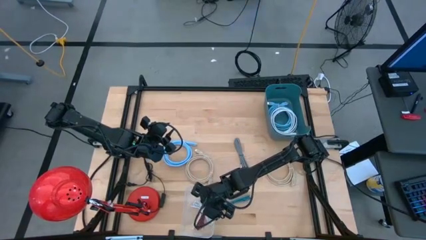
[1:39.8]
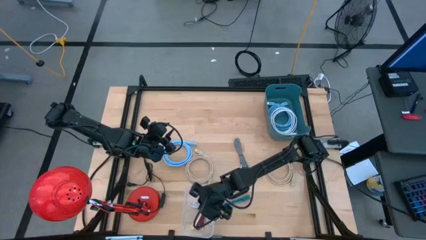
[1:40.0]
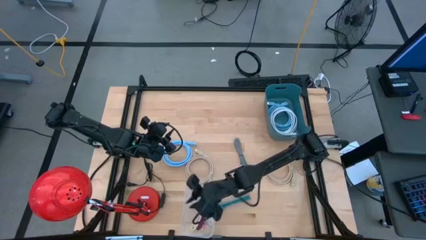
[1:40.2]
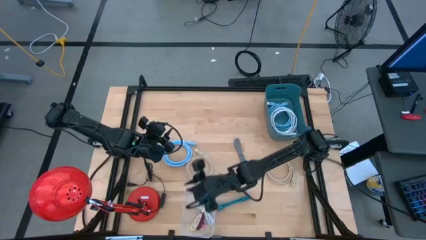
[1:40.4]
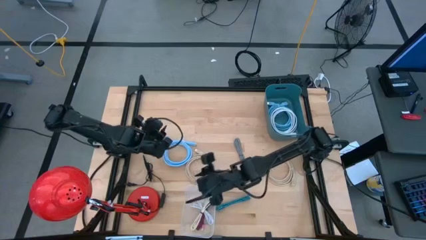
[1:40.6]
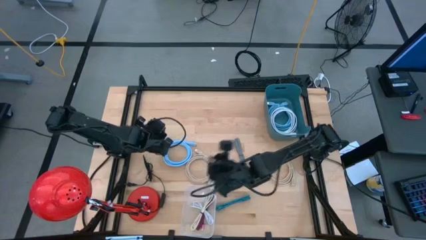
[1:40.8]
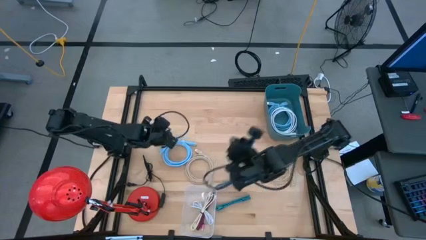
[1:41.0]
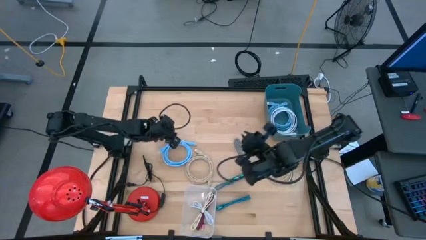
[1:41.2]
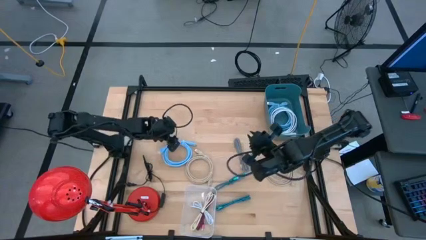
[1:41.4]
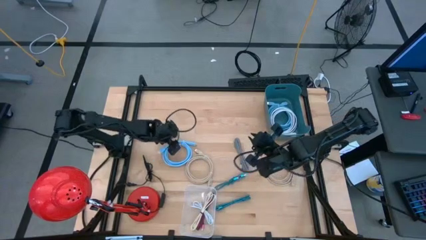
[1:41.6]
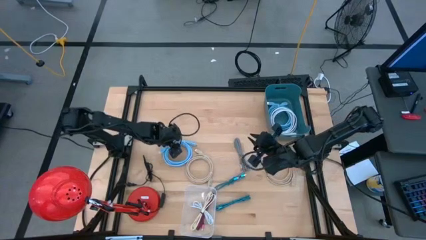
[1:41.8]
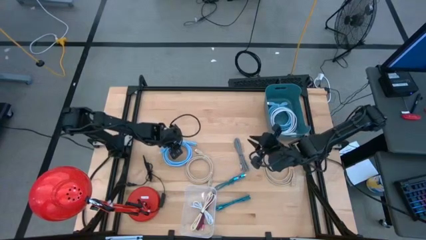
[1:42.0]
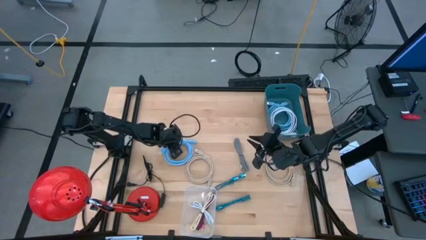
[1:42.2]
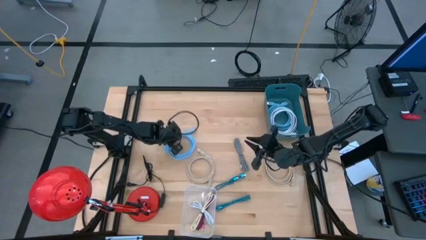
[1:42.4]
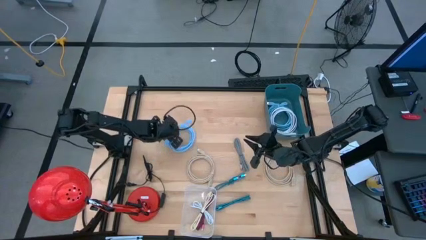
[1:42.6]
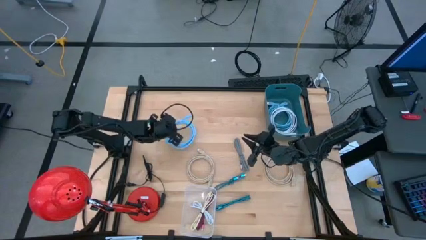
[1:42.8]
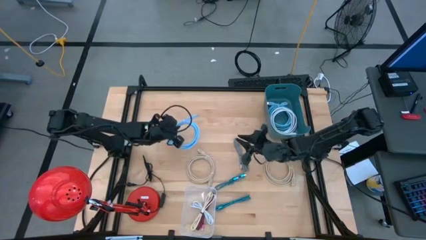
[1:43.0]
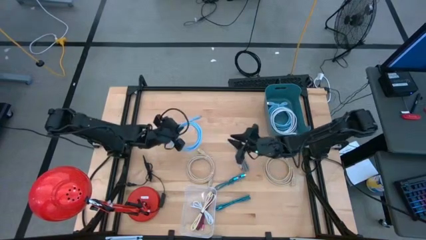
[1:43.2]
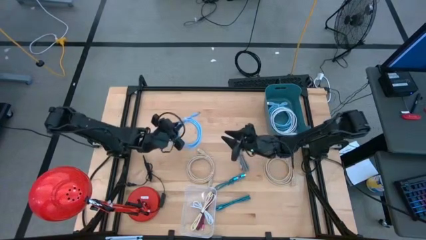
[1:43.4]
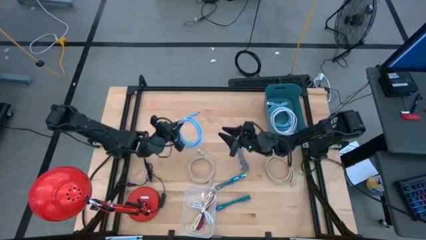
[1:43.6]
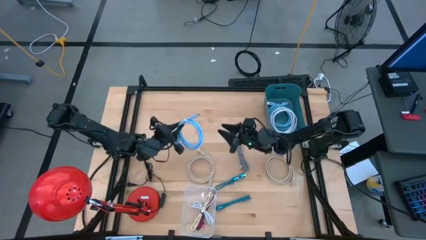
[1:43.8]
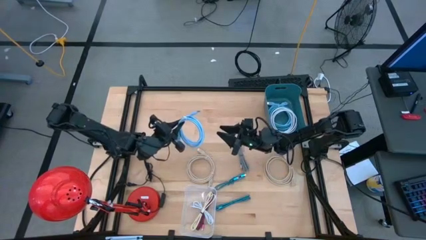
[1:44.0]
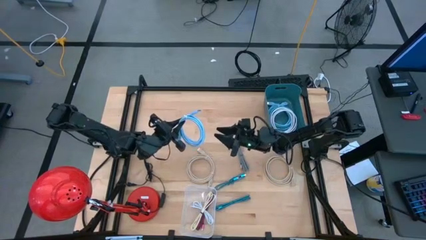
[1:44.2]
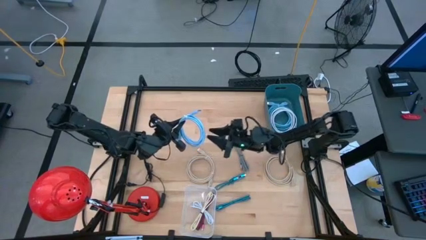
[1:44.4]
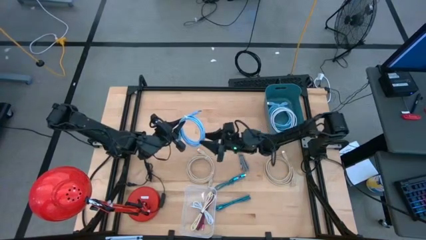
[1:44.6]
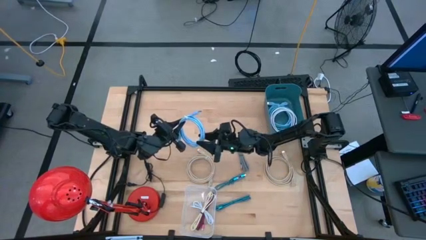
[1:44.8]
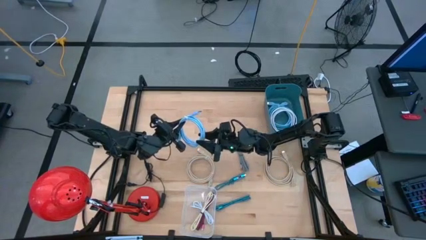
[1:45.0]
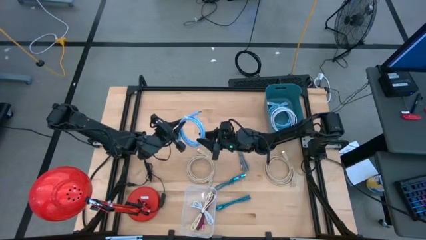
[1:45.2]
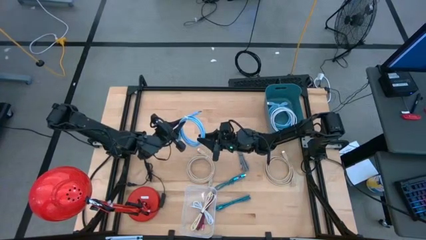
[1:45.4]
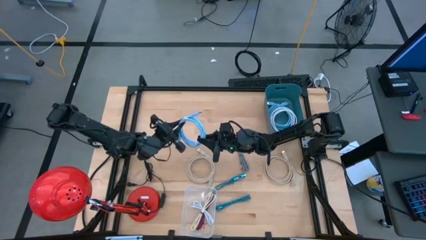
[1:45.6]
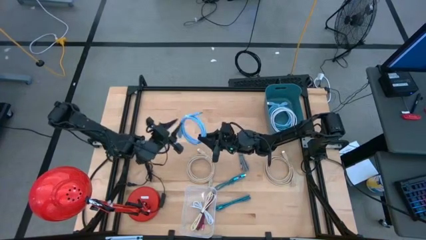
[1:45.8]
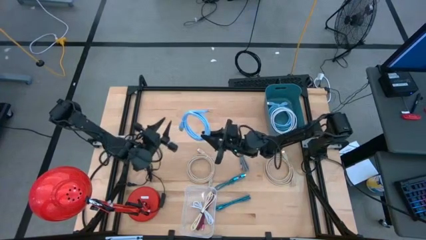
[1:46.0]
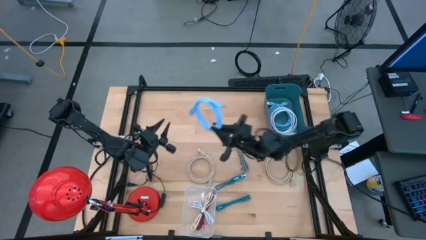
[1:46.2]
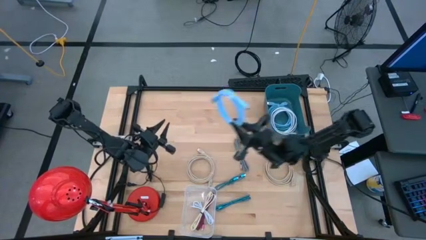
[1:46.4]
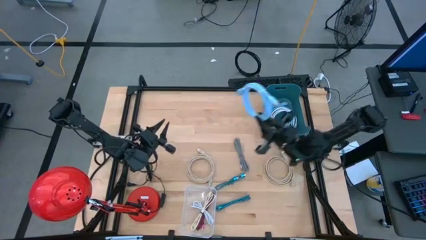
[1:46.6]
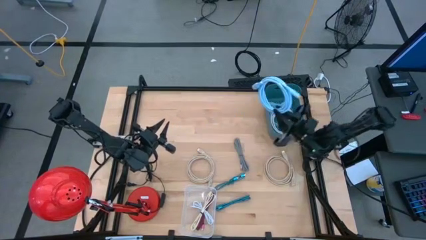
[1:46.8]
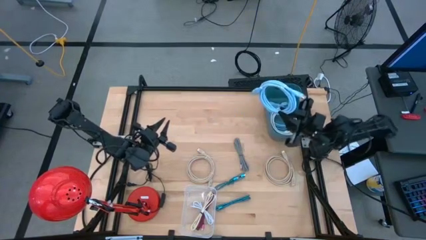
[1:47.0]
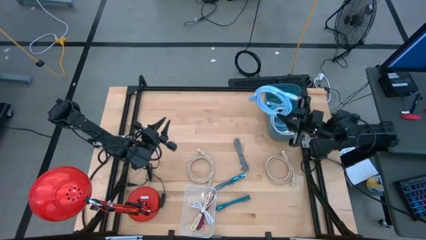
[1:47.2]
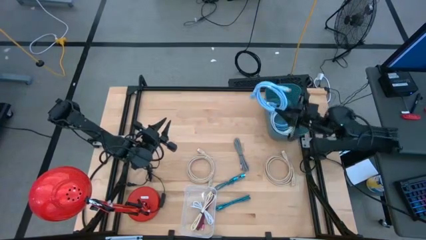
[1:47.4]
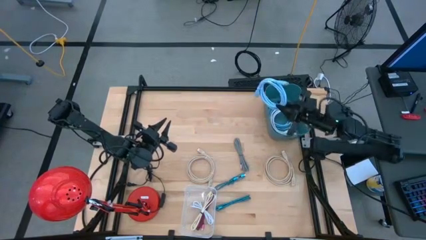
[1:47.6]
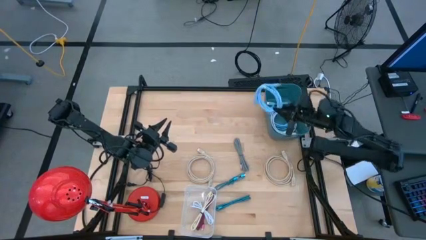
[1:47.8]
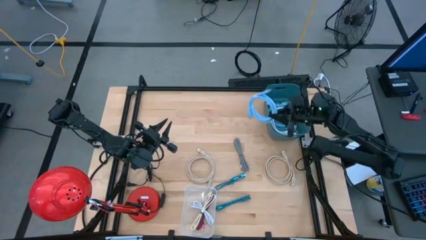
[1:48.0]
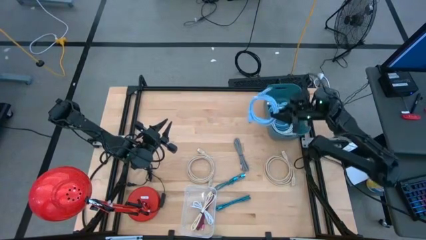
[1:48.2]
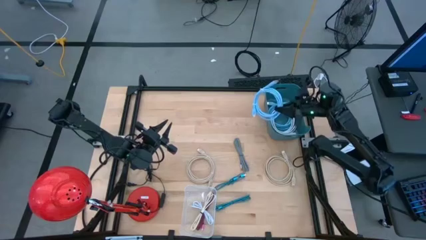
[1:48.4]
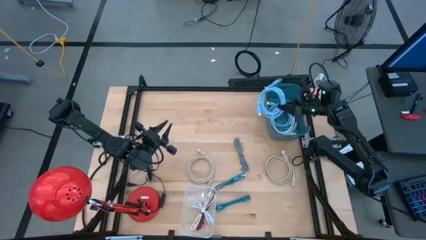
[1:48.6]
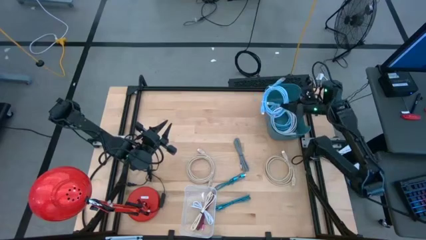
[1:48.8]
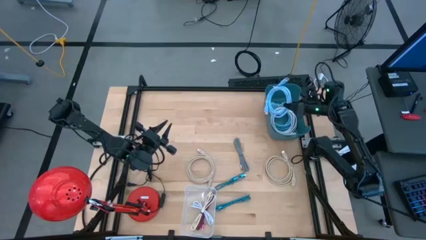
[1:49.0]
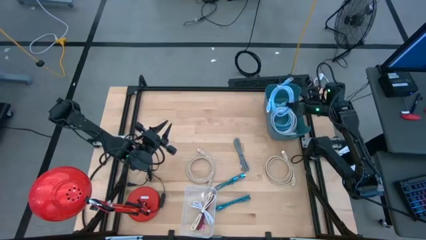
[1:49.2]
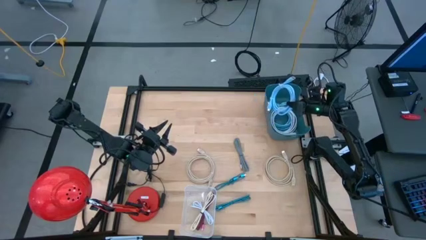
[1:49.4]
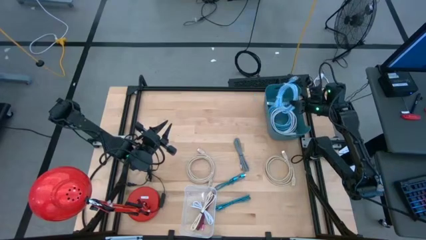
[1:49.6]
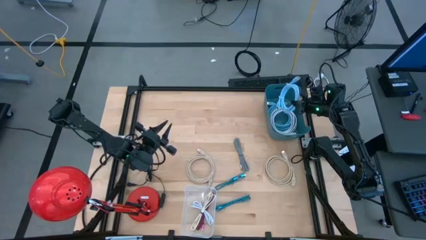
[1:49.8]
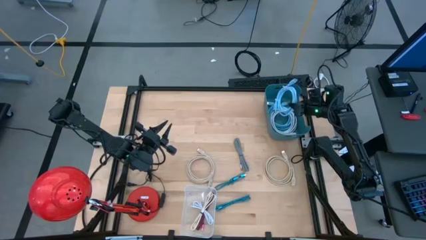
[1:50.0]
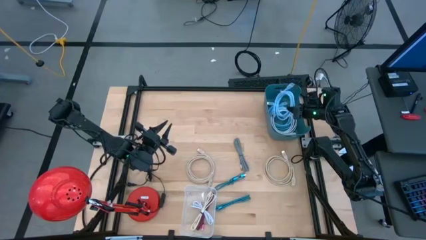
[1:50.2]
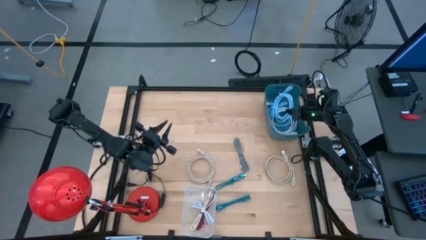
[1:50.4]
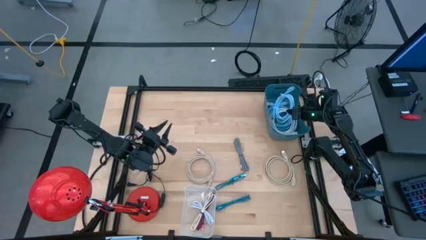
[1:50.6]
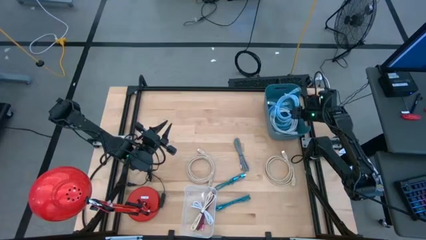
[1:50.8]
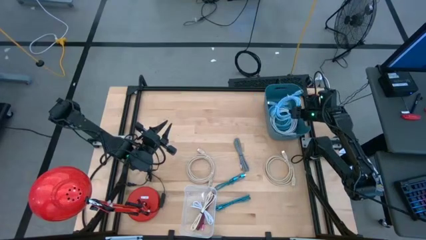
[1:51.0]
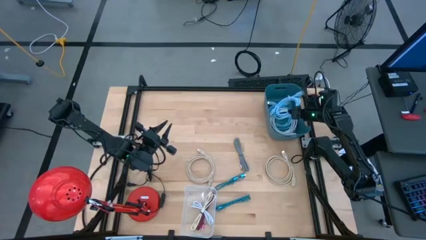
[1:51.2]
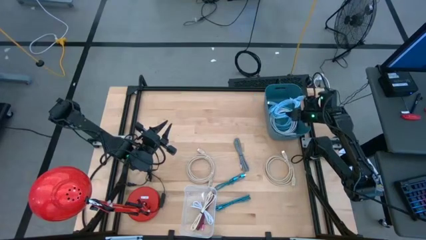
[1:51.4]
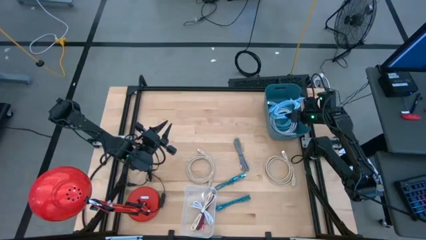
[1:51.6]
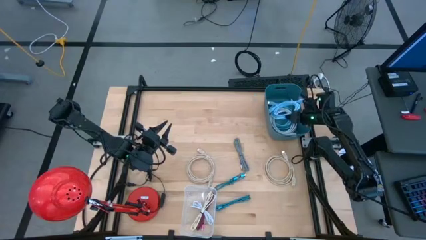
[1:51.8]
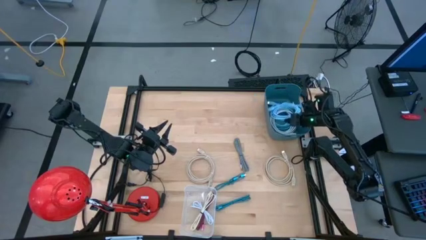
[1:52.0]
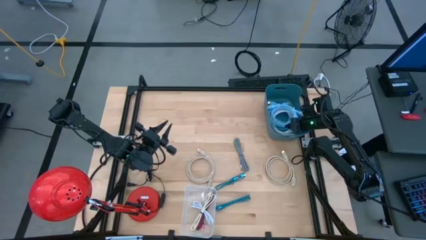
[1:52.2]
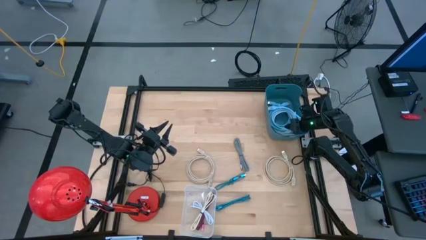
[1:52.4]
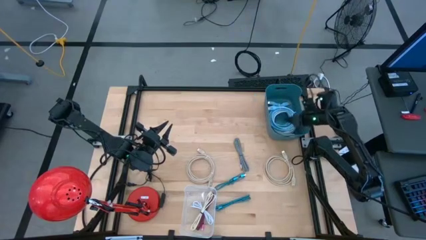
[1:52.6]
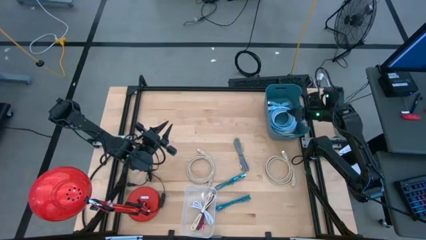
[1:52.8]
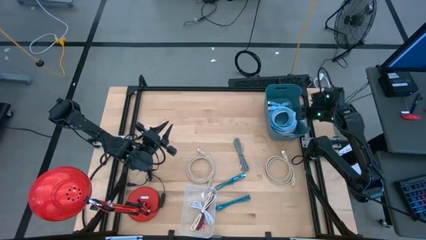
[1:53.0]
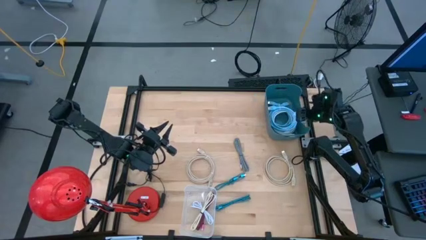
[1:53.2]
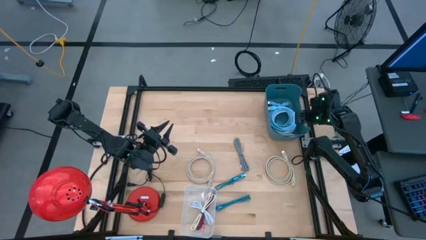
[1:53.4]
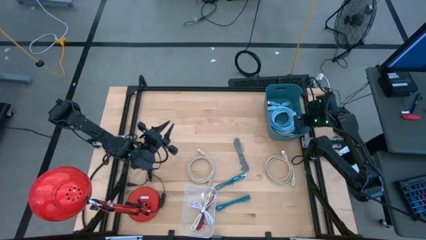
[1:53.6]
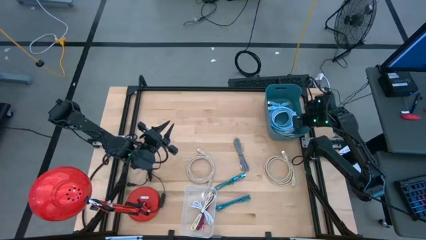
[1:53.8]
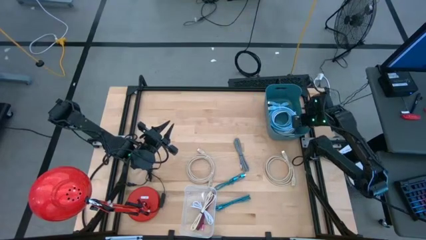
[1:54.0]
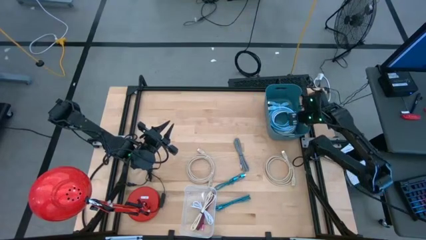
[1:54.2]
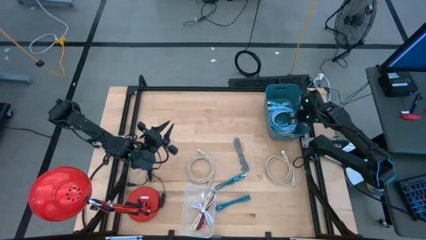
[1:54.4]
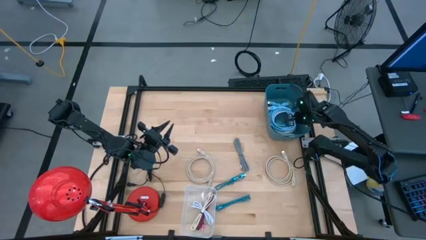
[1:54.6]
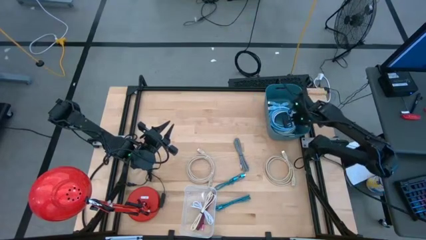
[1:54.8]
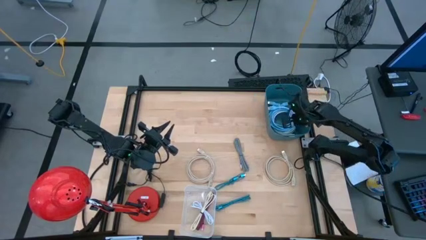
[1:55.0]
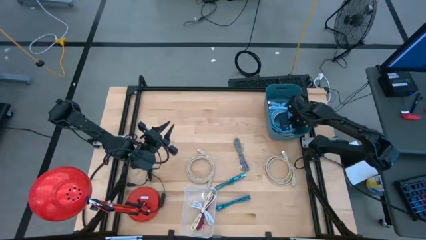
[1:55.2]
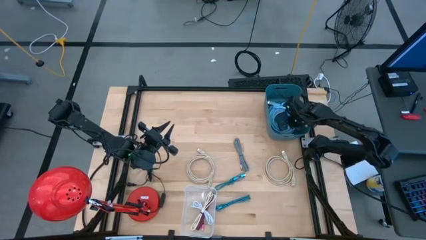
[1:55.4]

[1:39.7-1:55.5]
Task: Pick & Place USB Port
Put the blue usb cable into the blue bin
